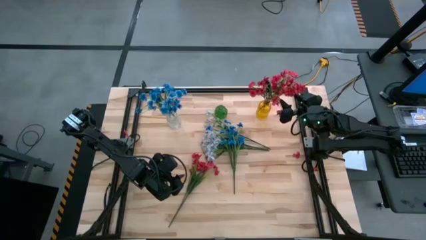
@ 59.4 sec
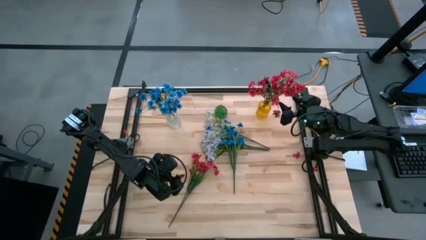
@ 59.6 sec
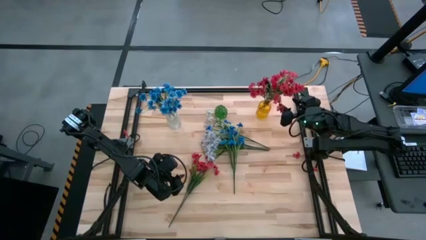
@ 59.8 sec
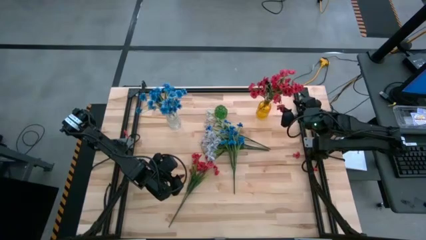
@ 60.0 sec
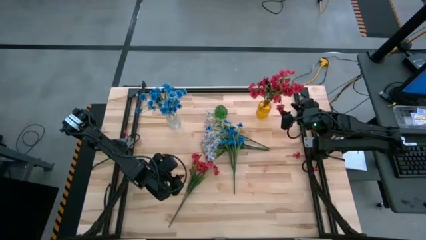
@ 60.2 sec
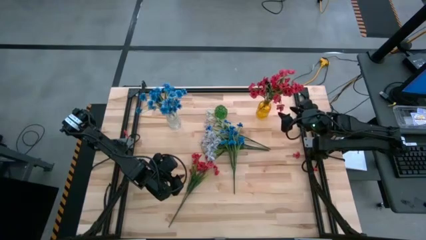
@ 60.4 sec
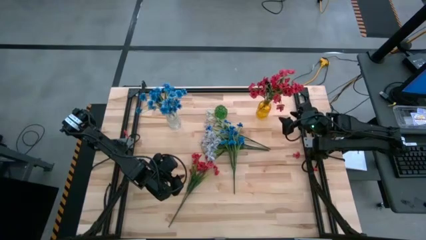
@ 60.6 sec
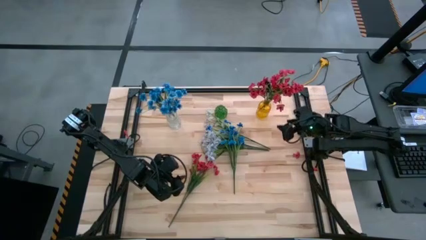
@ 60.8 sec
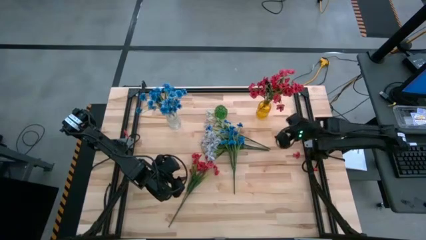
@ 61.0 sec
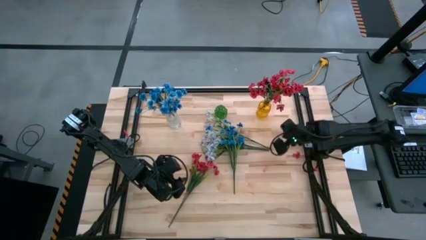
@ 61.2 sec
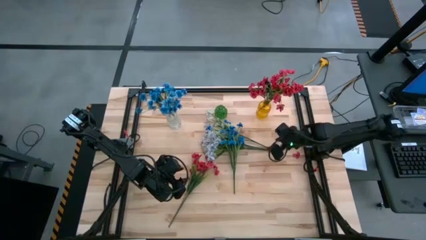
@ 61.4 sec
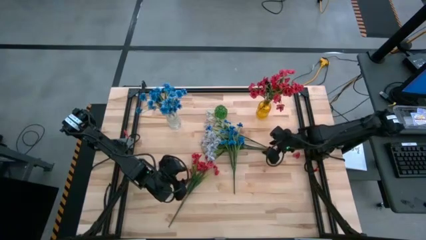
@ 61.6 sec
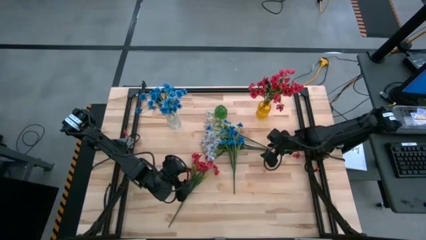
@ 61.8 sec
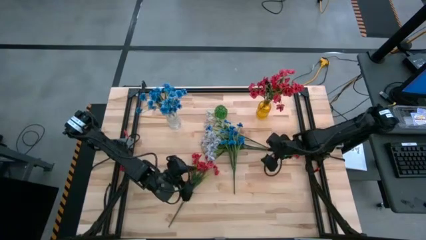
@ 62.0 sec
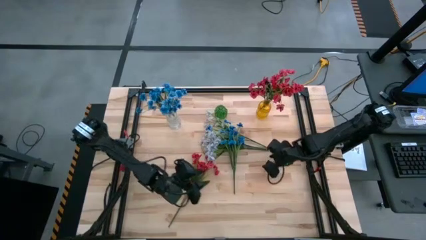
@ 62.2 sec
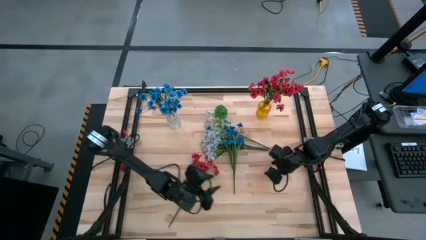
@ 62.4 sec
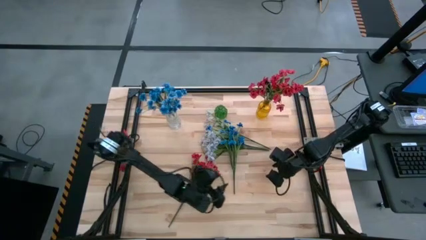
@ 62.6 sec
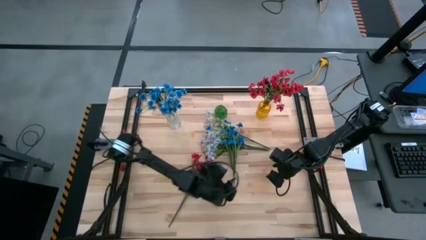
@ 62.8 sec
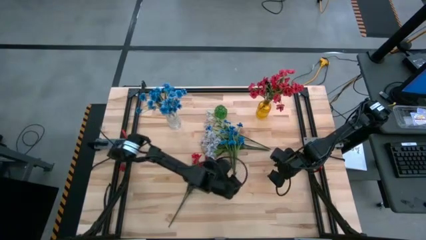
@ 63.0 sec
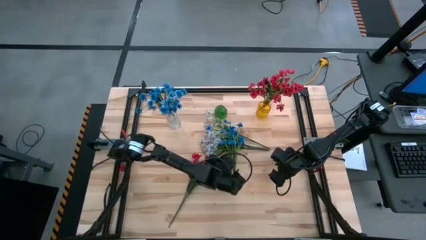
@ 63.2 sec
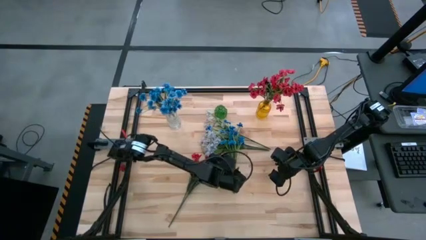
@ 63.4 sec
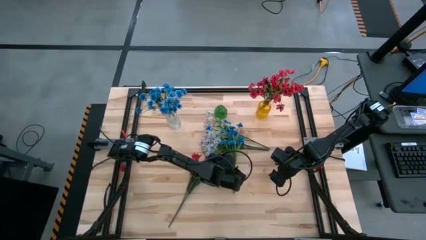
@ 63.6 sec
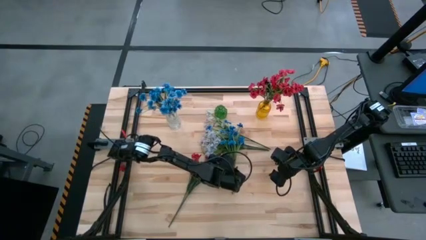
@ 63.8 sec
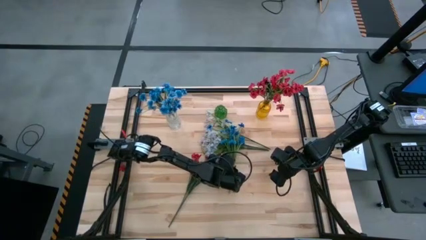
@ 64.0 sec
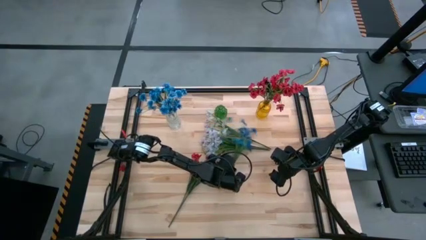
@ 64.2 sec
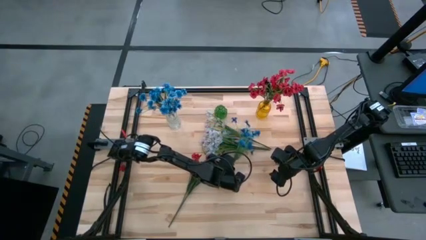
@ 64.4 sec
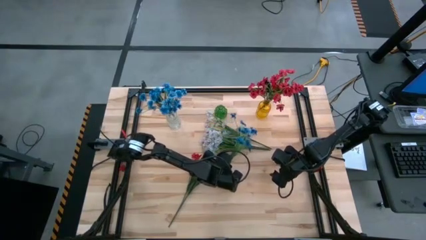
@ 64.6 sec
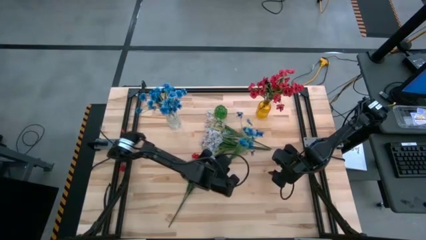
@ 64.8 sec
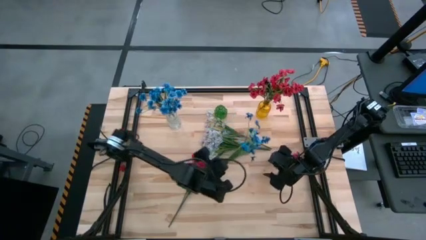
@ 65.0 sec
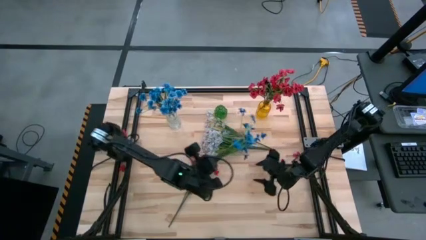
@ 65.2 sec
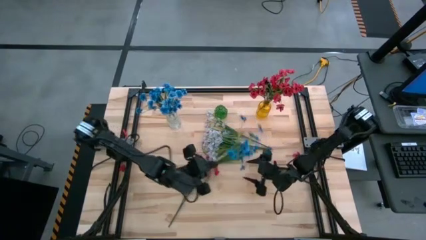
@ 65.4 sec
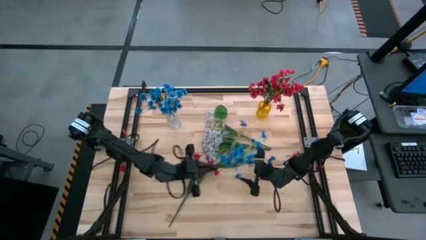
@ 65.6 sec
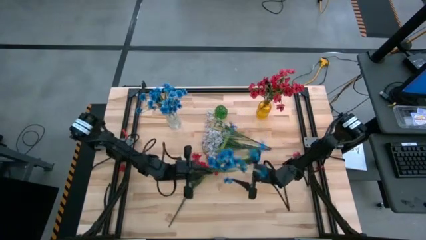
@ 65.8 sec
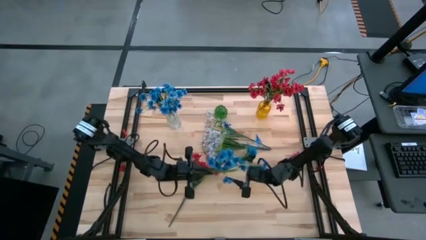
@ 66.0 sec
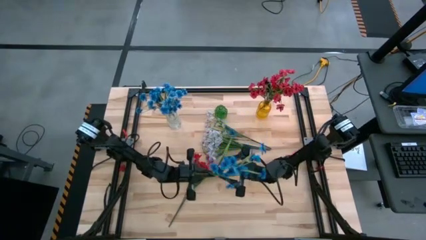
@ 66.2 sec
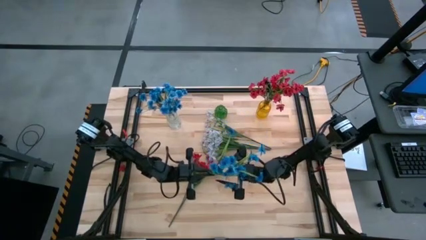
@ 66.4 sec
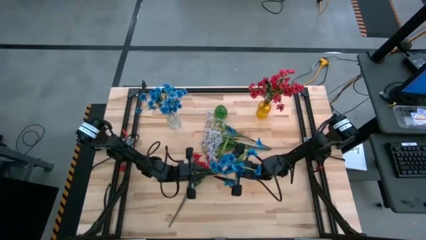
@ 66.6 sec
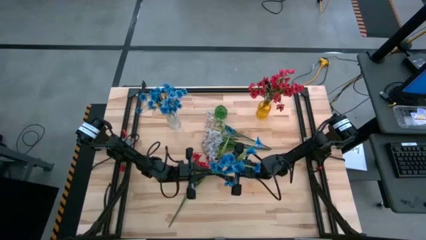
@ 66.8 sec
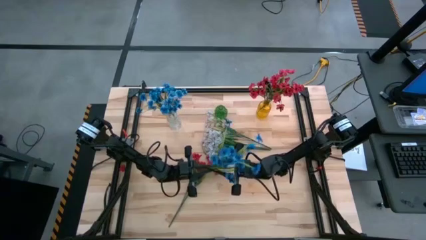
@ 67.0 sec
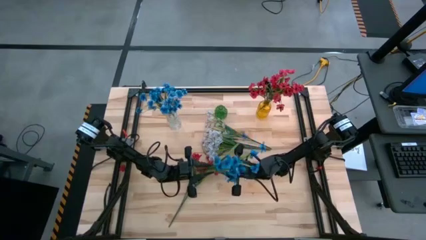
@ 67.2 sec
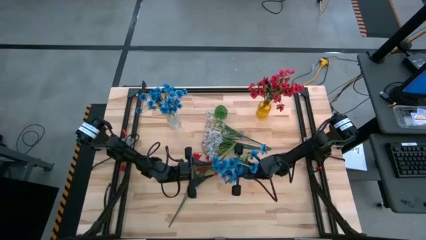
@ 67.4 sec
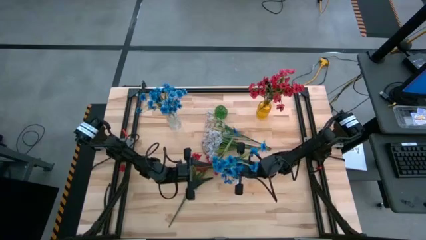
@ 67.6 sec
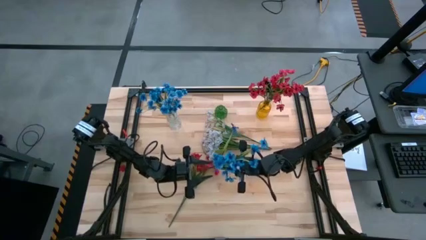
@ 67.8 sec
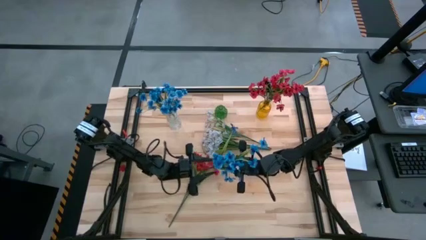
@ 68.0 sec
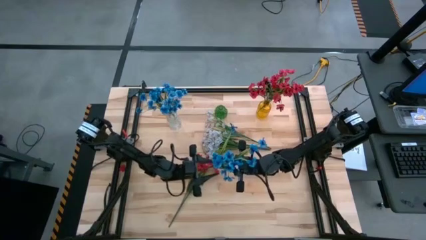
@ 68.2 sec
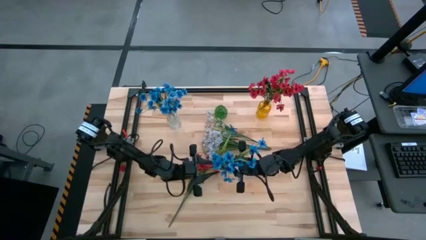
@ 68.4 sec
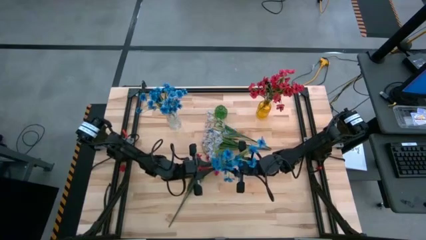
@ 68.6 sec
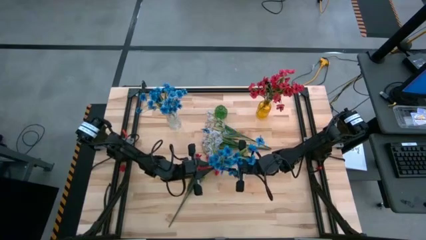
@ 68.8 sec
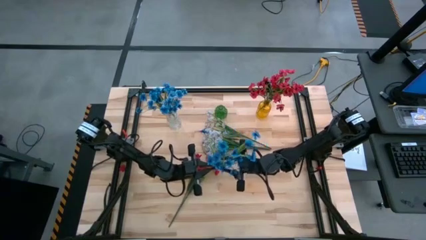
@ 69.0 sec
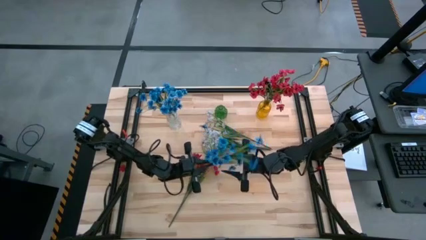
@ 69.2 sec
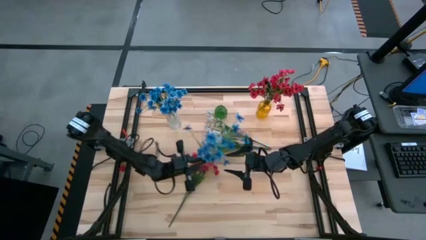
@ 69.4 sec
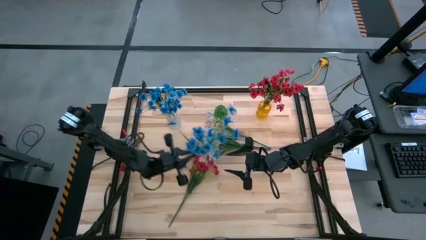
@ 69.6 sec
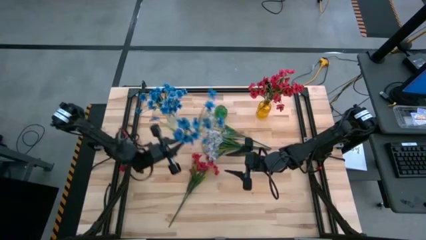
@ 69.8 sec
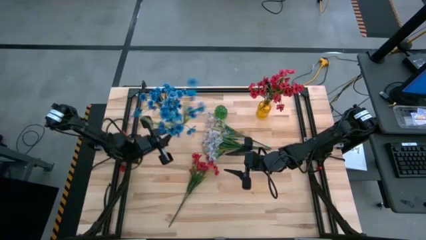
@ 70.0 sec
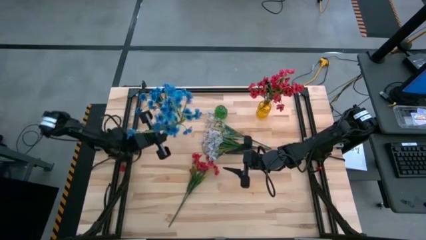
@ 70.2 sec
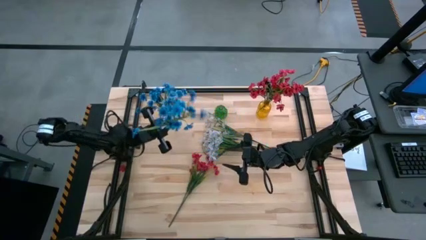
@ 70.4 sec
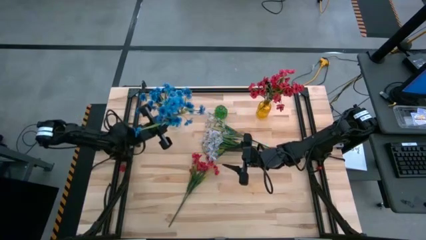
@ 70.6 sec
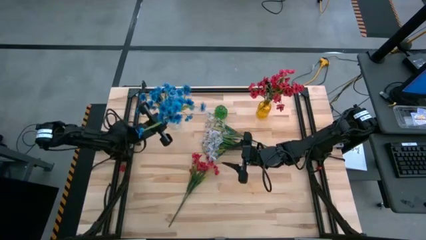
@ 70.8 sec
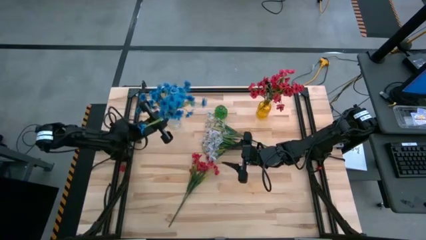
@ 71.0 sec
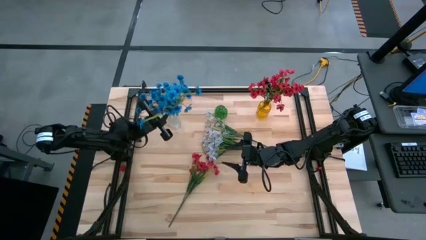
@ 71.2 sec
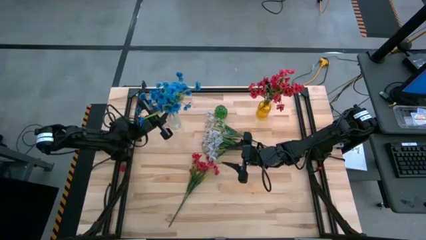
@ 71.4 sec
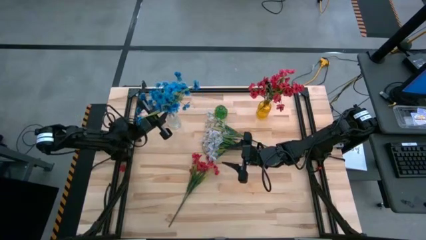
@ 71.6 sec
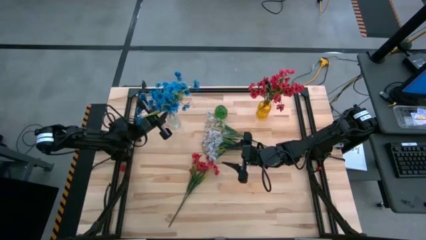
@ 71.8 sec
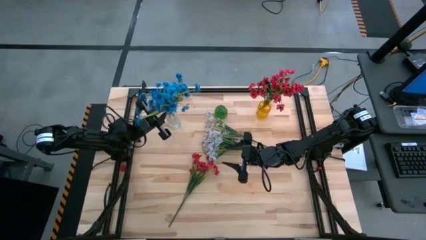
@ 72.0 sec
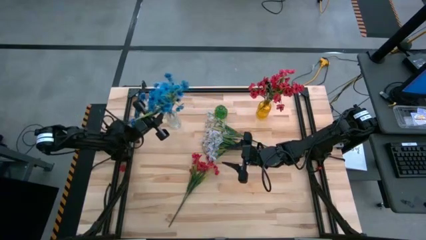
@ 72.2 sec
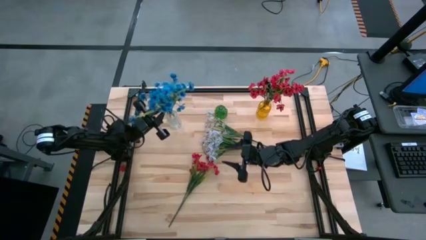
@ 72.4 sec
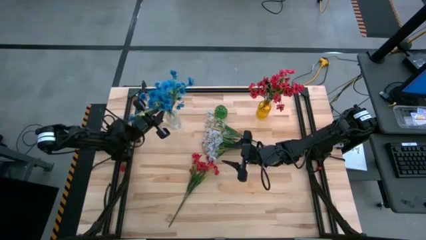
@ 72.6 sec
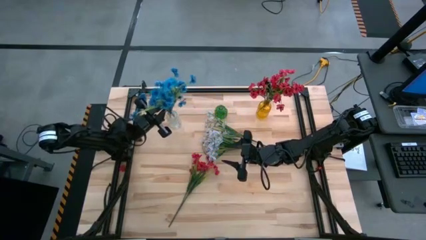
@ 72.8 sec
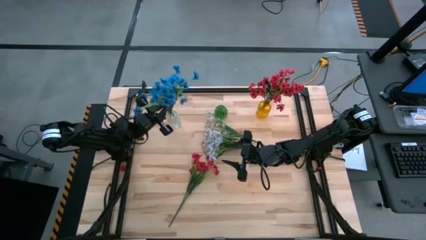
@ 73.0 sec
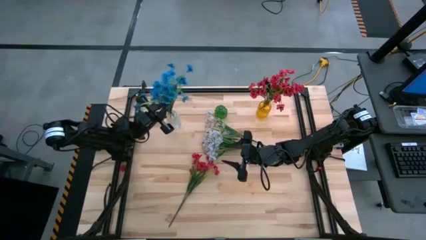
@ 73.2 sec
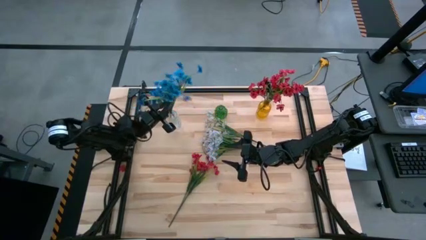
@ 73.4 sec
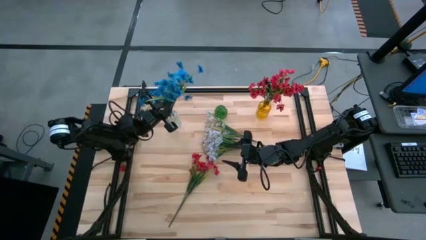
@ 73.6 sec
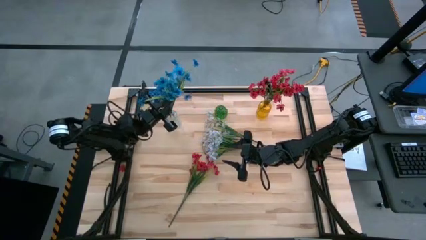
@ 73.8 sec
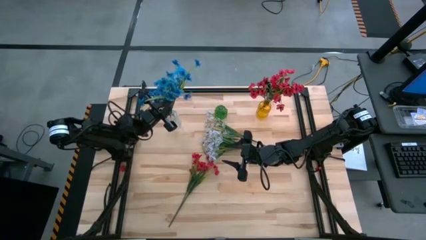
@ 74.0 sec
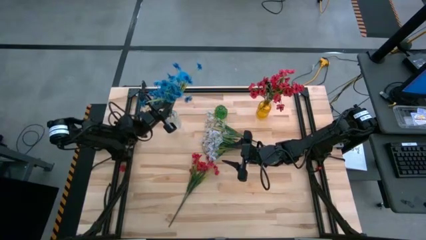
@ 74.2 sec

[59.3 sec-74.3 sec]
Task: Sort flowers into vase by color
Put the blue flowers into the transparent vase
